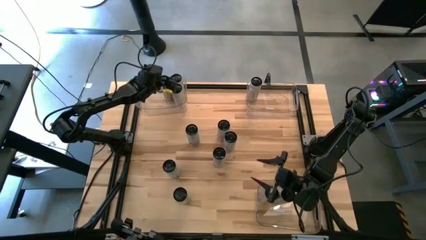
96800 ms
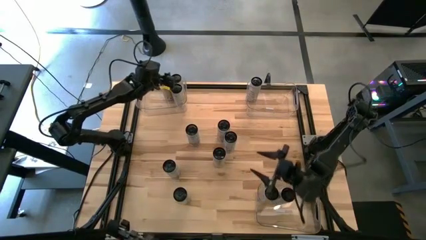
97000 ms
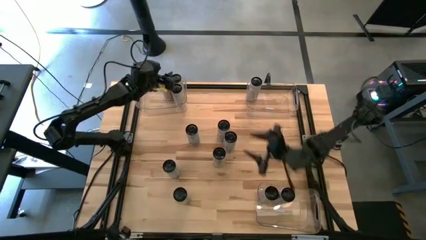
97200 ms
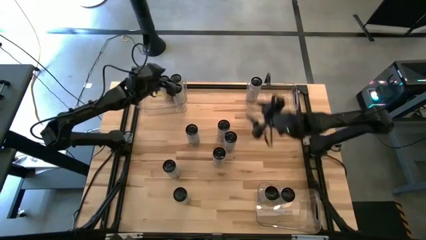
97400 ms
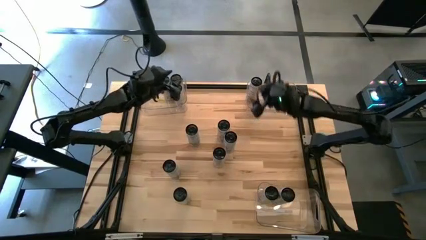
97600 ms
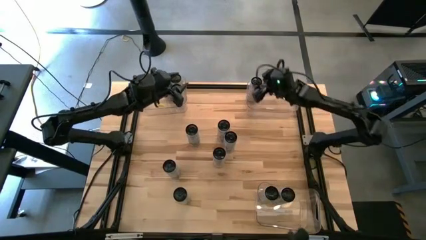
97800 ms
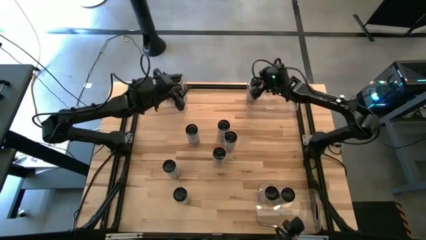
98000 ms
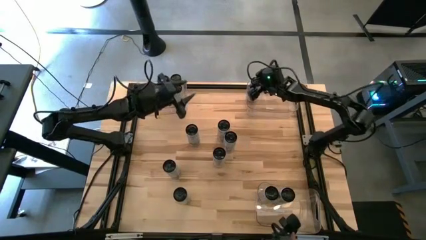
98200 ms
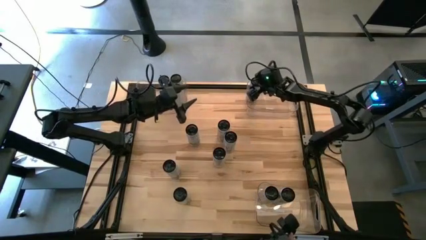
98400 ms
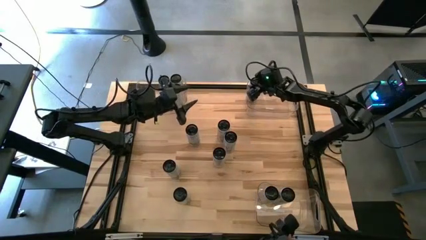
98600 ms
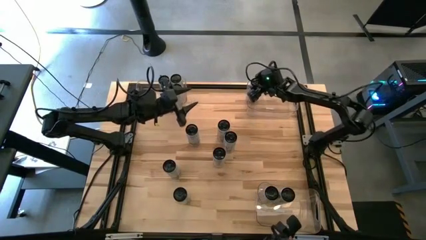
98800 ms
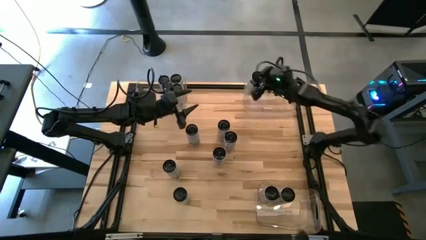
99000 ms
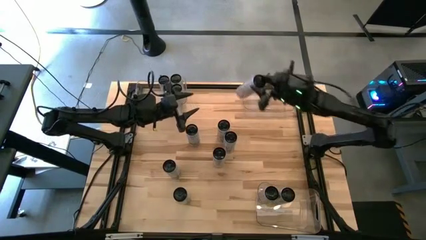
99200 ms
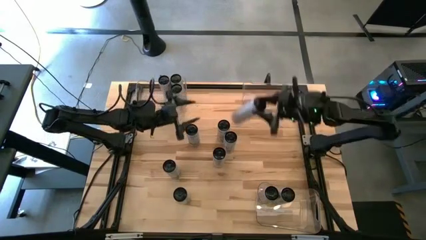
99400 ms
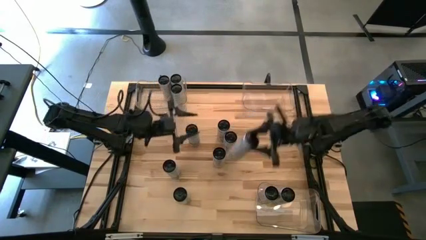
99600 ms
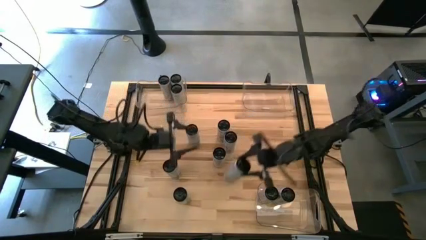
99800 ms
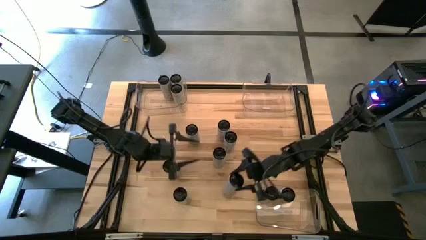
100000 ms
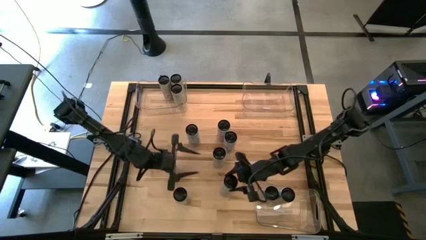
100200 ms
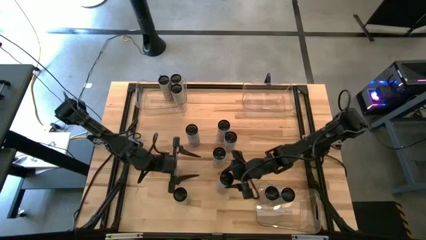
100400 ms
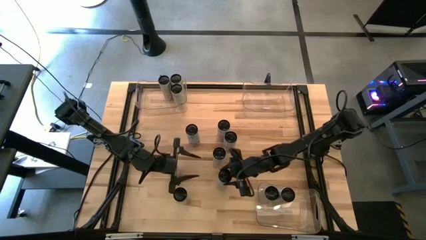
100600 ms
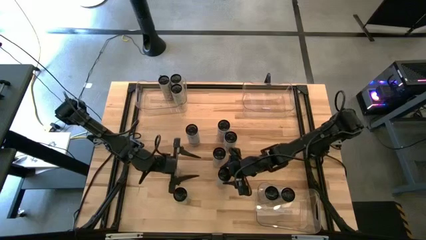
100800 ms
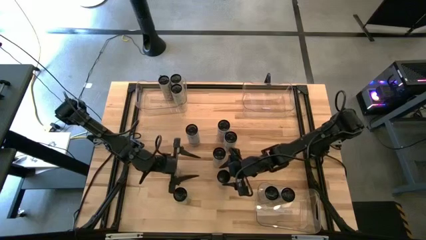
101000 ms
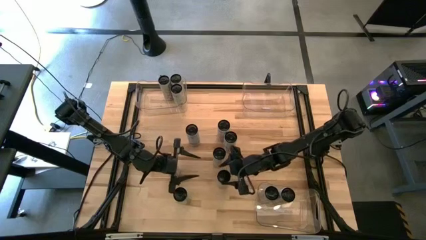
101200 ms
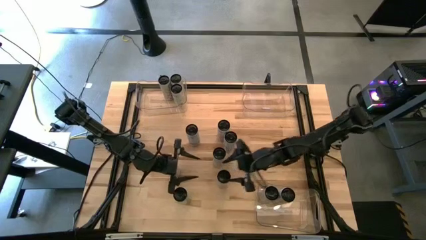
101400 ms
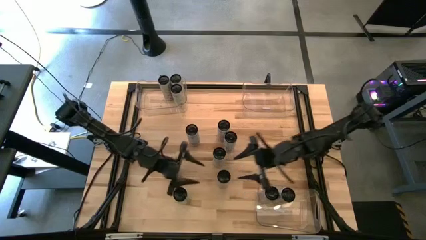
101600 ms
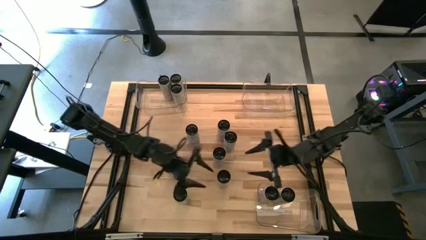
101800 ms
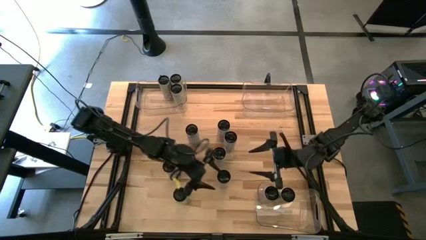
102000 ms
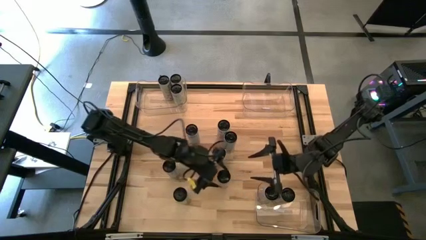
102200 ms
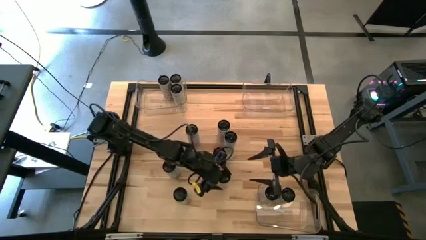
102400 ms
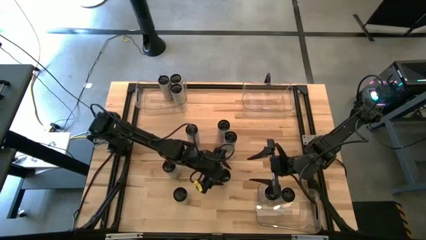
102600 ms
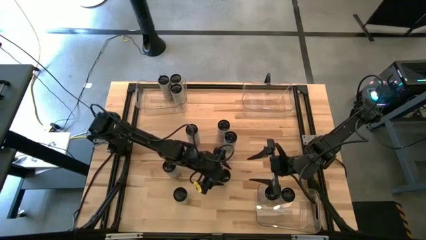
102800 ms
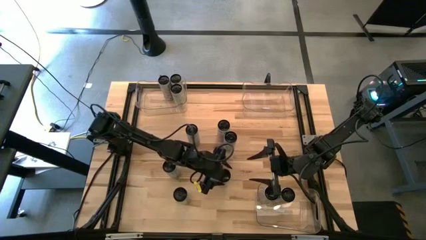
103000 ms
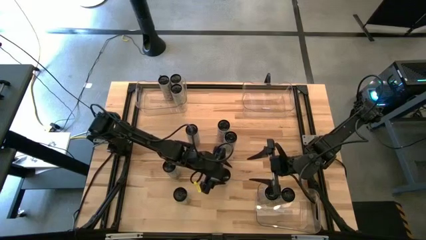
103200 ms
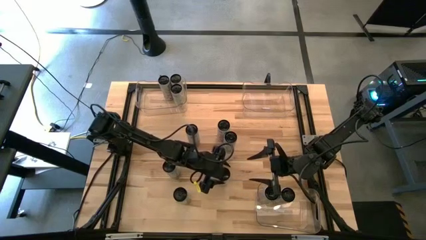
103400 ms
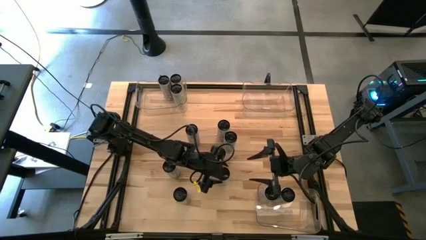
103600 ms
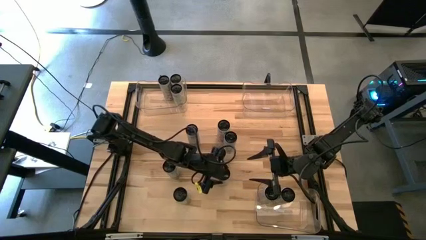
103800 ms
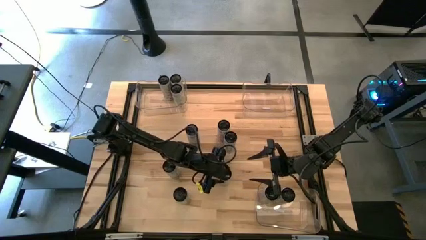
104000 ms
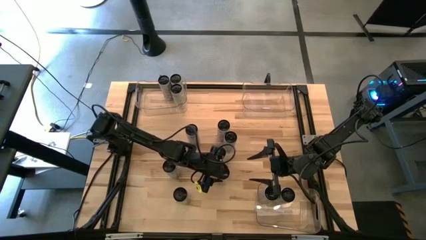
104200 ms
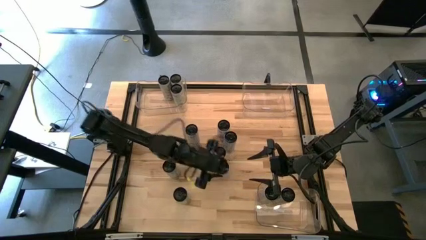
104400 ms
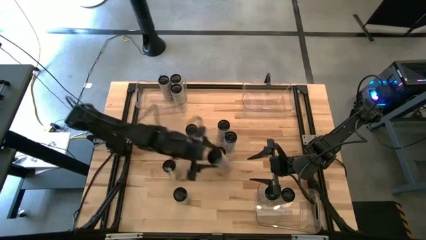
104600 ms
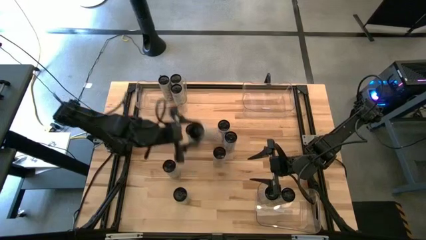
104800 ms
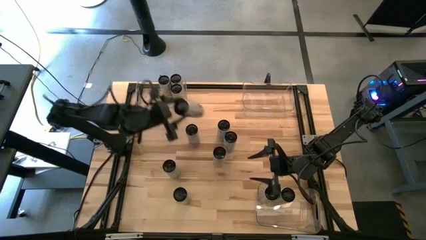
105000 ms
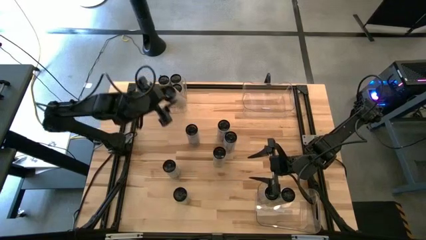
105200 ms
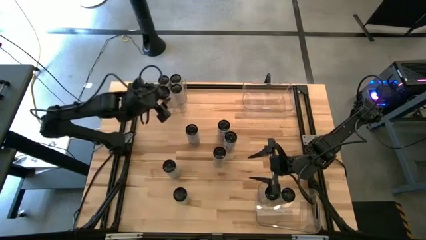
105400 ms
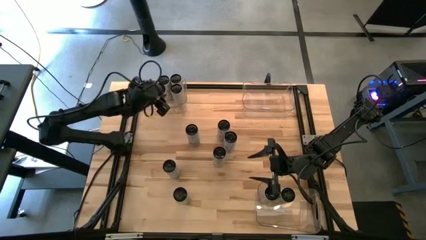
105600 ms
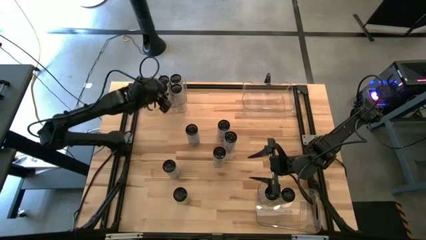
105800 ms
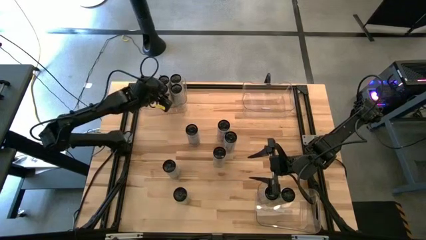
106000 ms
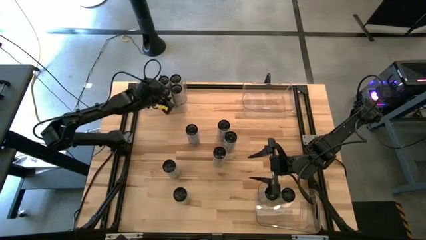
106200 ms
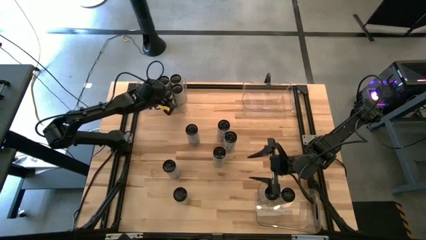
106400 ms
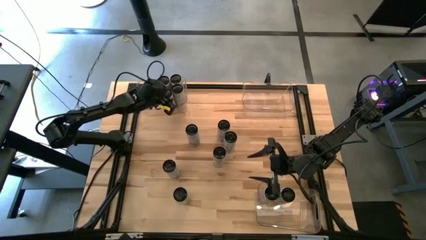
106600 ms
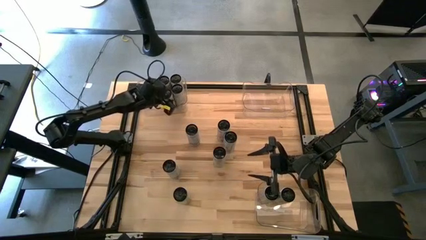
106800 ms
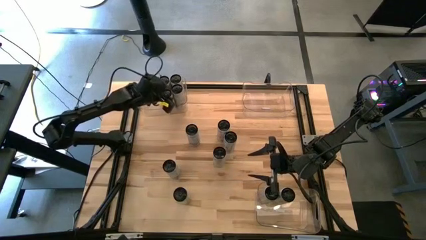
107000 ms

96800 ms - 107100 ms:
Task: Sort soda cans
Put the white-yellow soda can into the top left transparent bin

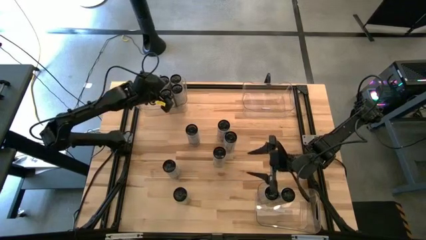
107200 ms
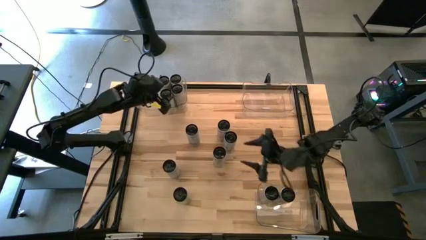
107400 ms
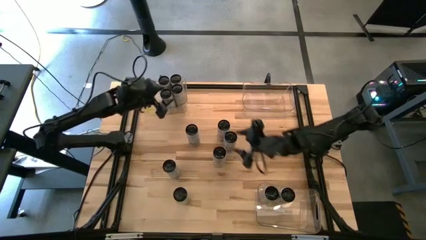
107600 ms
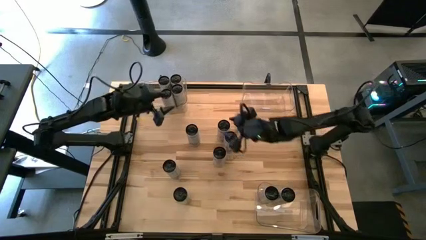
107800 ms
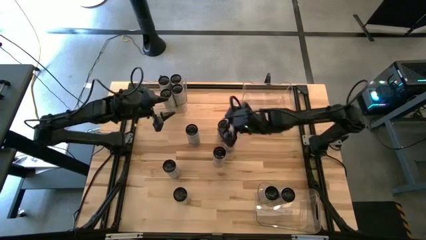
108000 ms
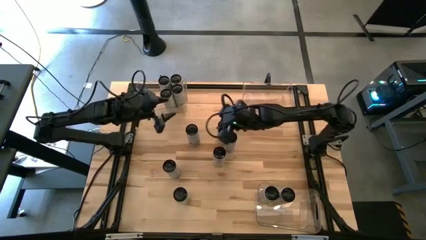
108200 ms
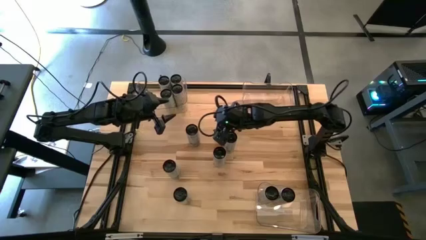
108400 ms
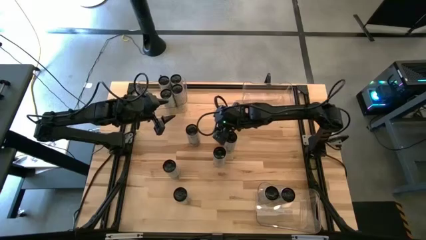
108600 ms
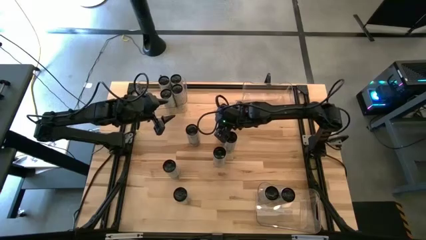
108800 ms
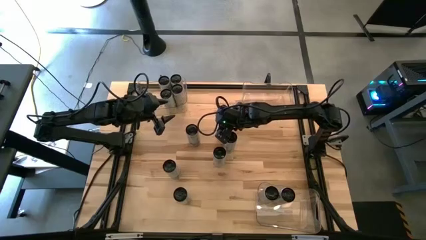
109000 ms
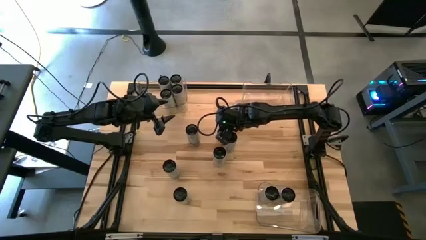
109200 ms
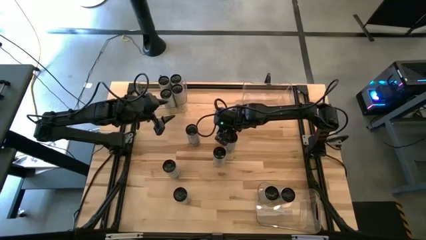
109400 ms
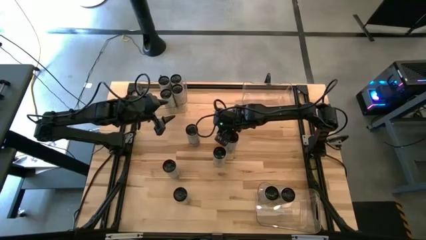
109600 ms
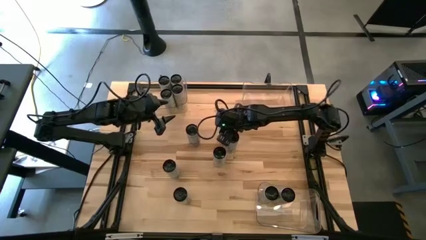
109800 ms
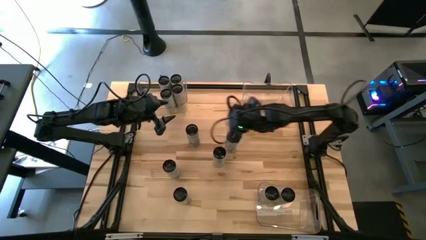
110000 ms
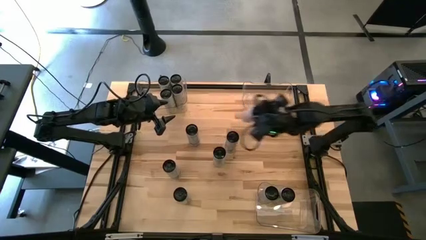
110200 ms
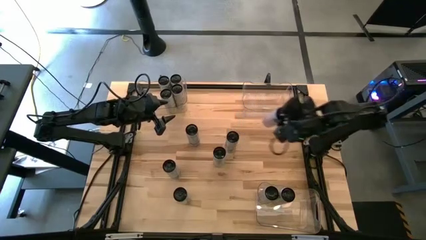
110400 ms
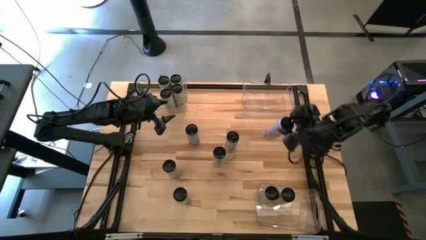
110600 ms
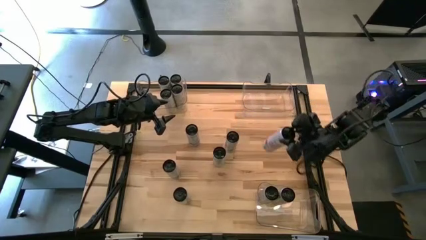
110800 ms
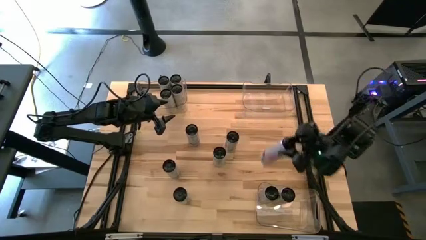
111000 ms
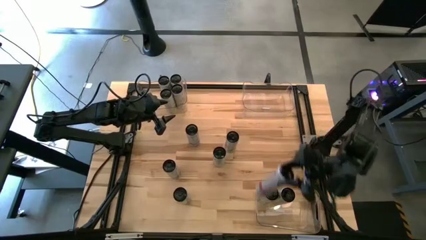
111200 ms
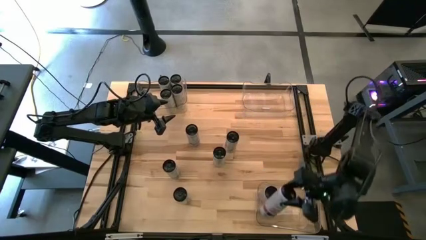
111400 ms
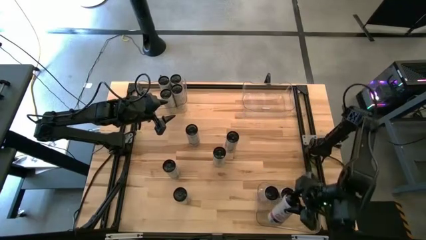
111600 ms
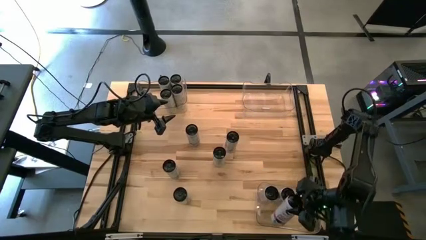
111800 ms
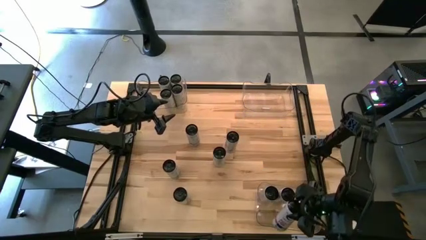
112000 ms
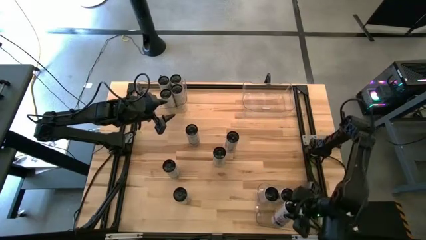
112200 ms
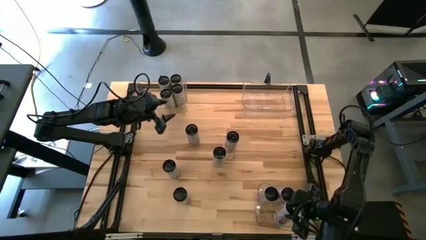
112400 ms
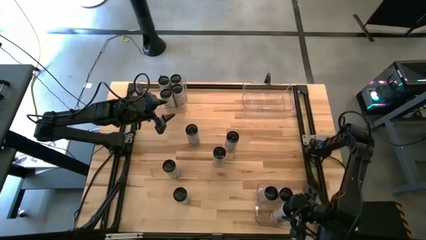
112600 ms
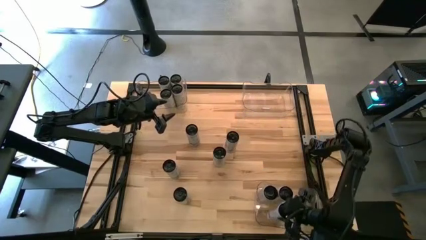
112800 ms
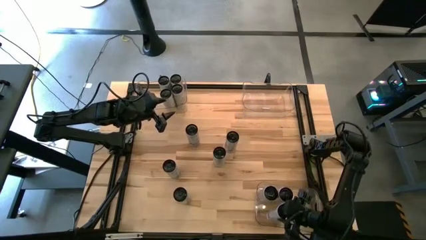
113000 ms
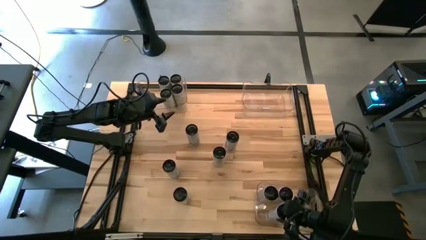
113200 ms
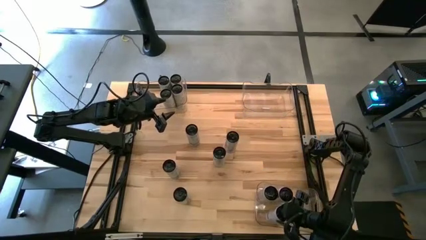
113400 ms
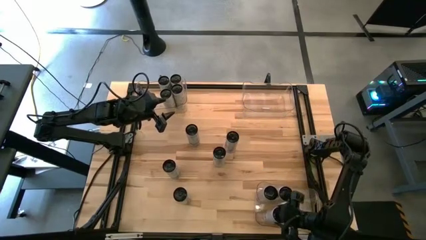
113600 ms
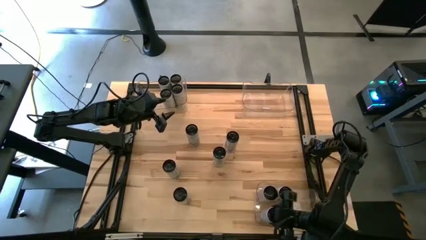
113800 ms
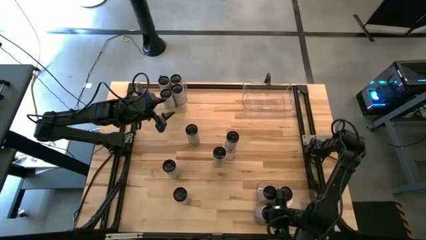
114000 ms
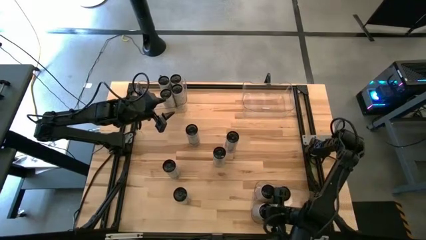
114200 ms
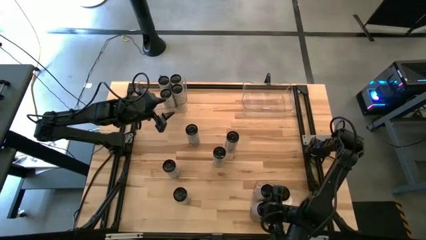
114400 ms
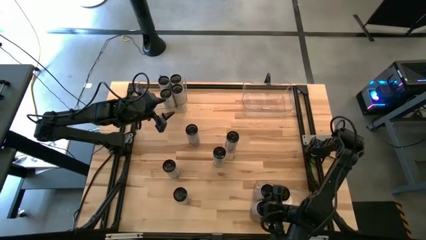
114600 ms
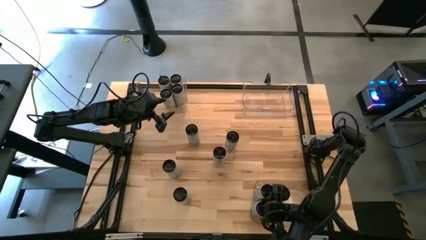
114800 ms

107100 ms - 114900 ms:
Put the white-pink soda can into the bottom right transparent bin
